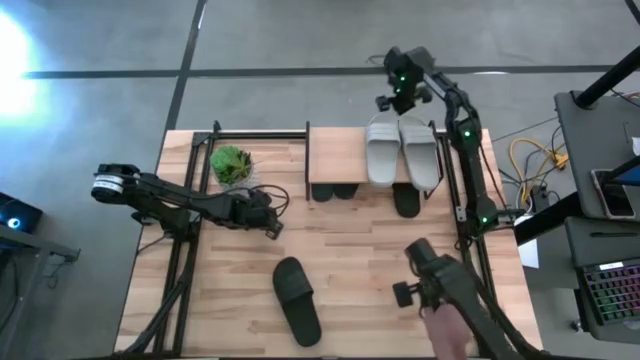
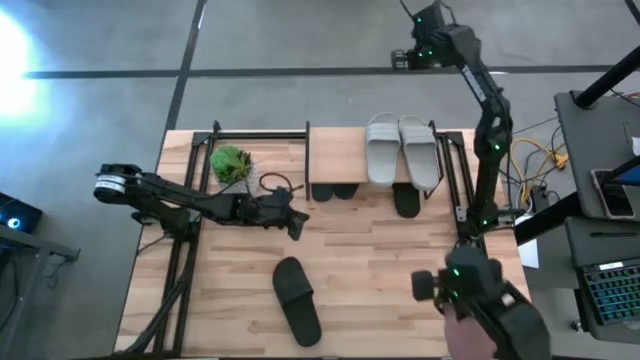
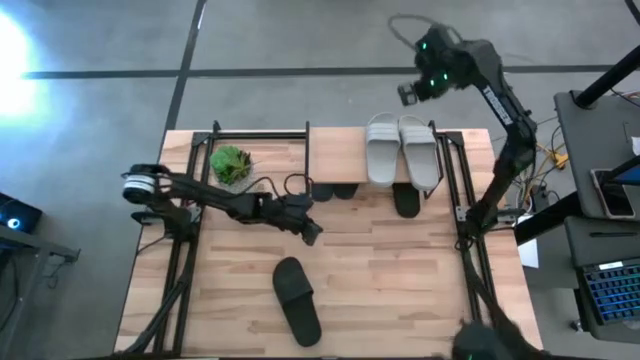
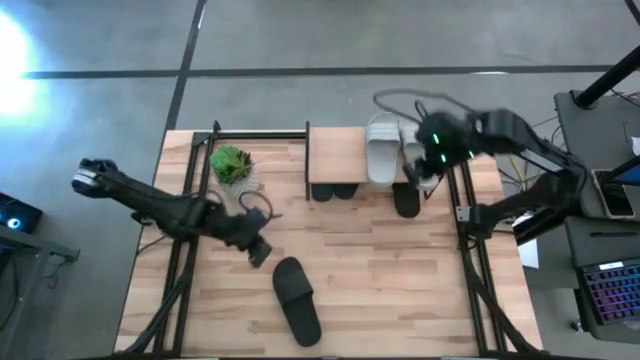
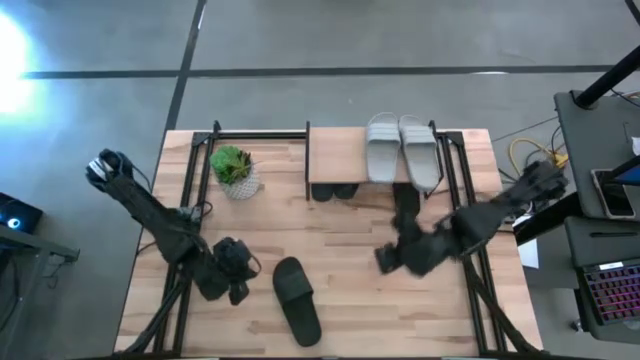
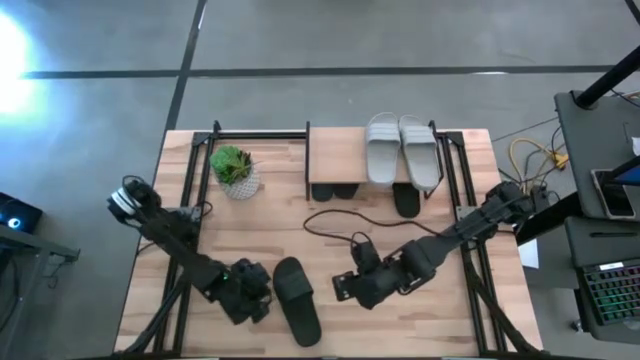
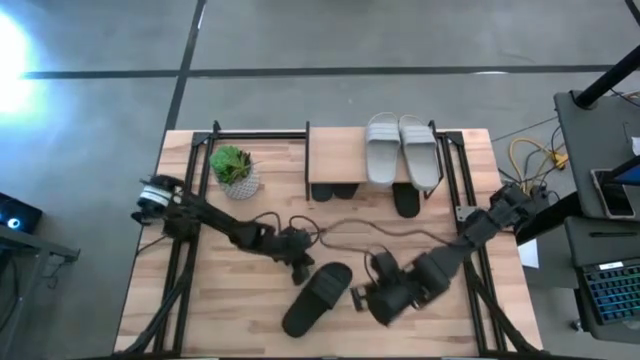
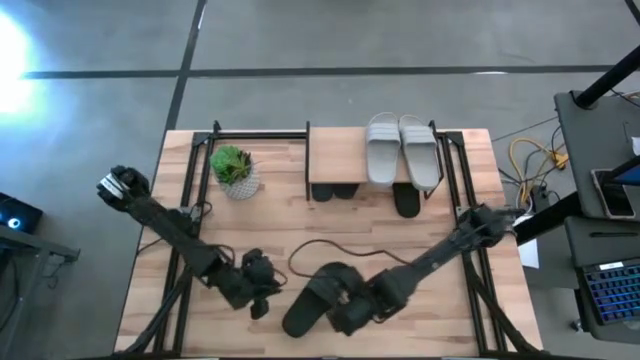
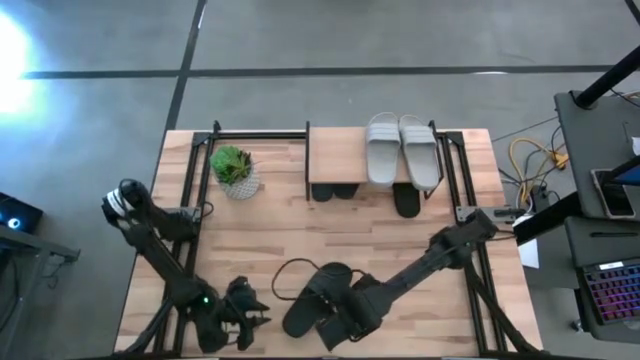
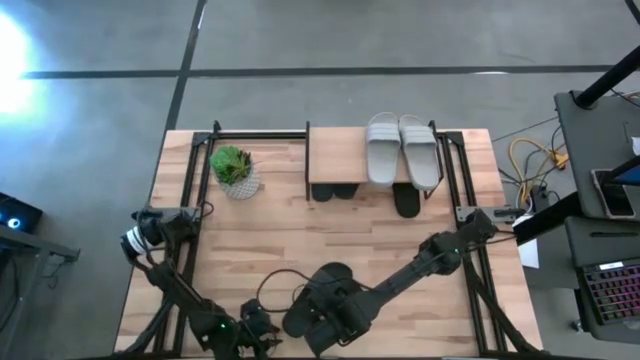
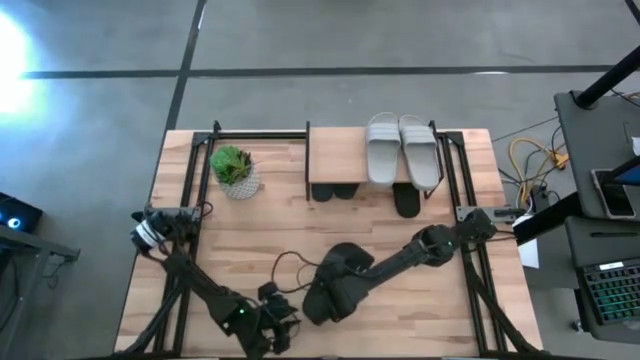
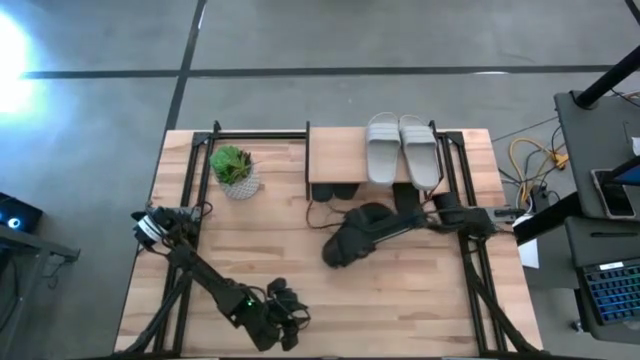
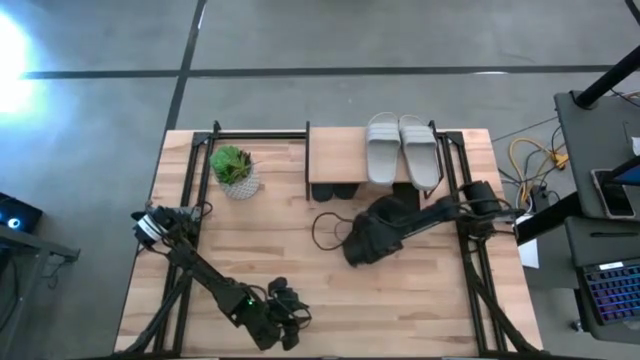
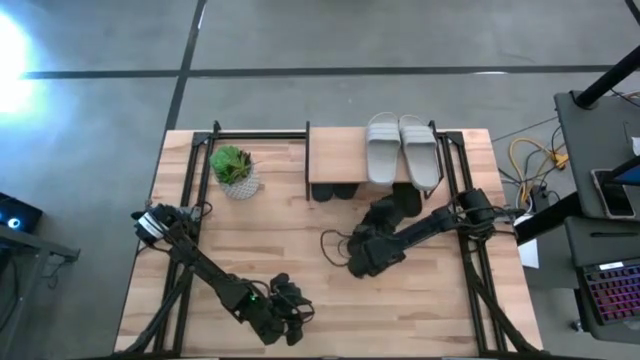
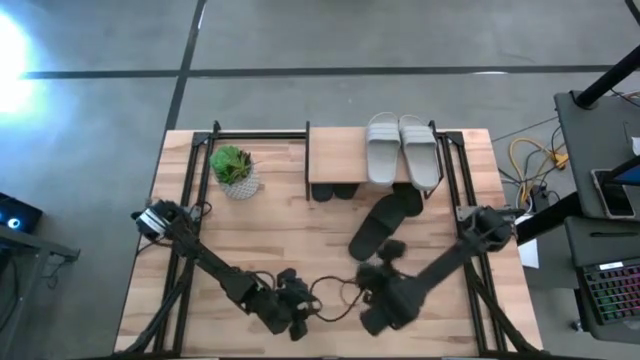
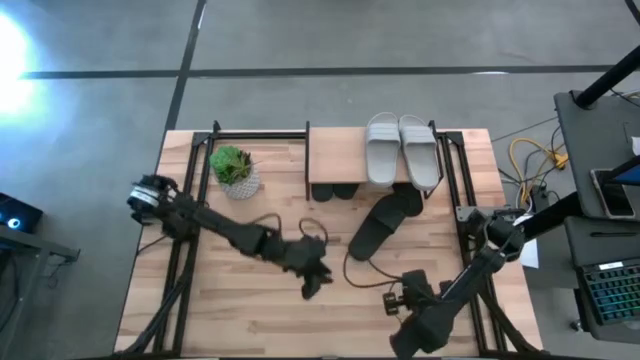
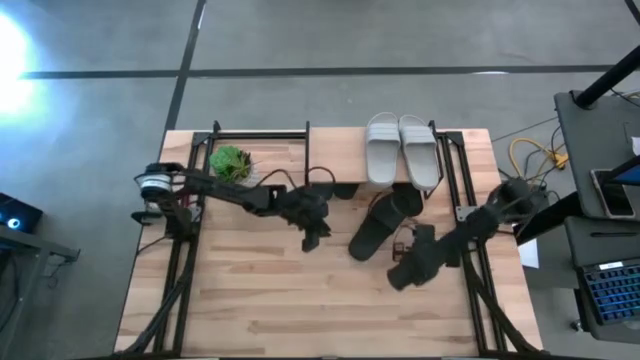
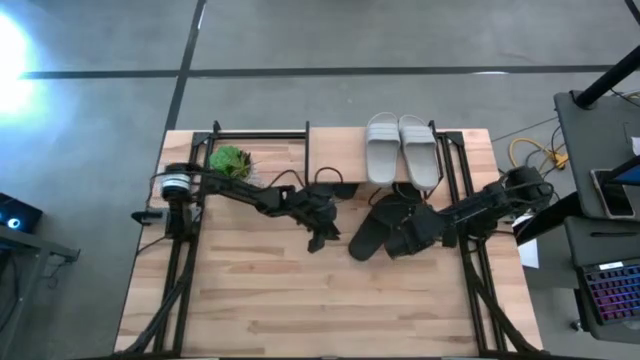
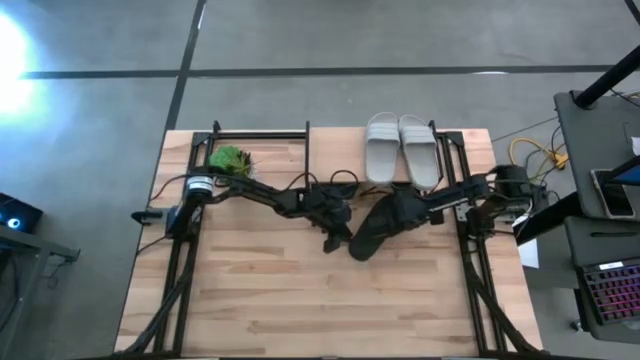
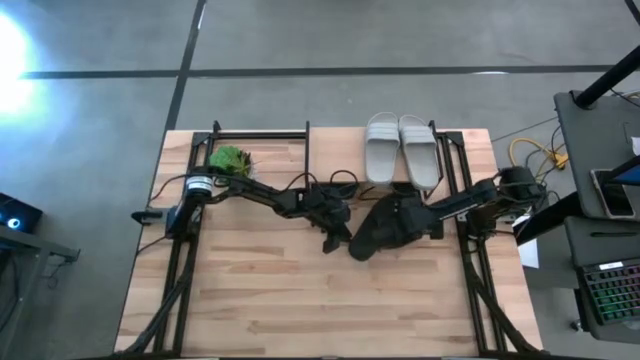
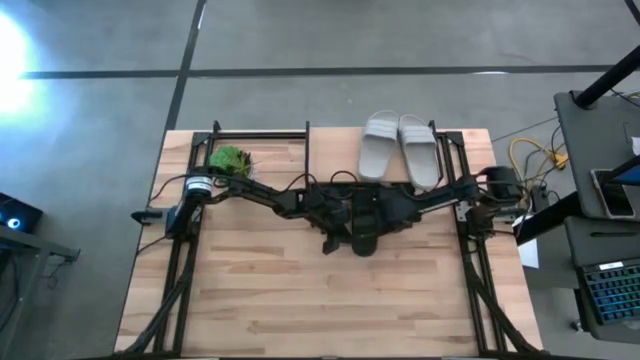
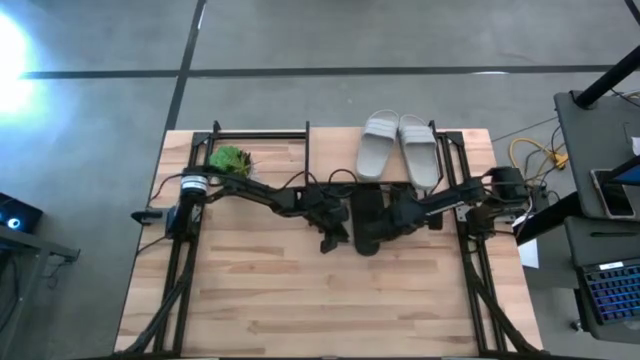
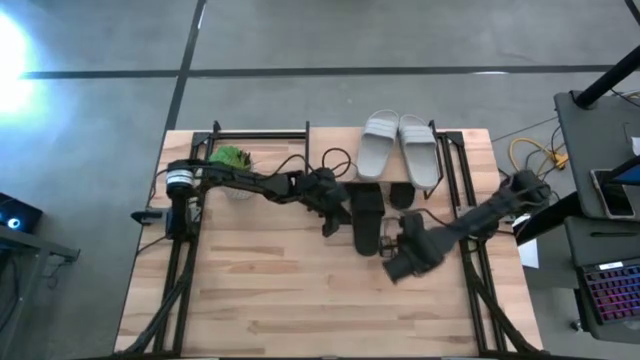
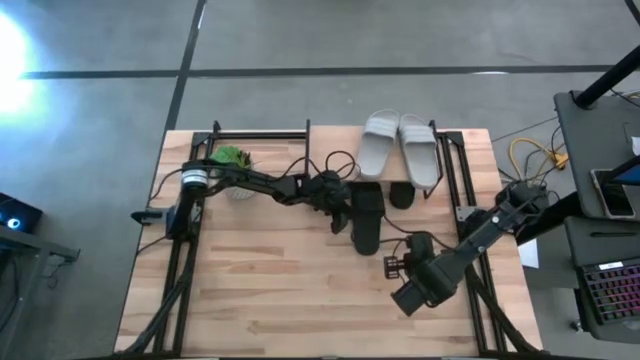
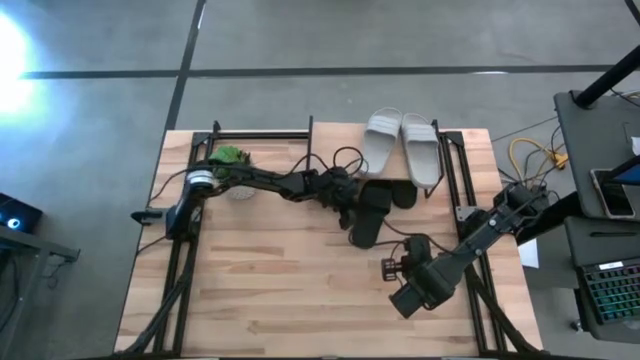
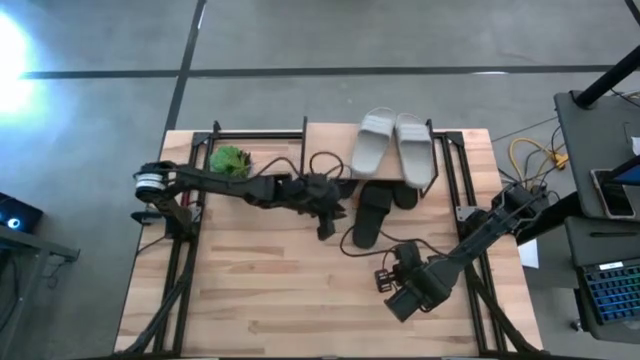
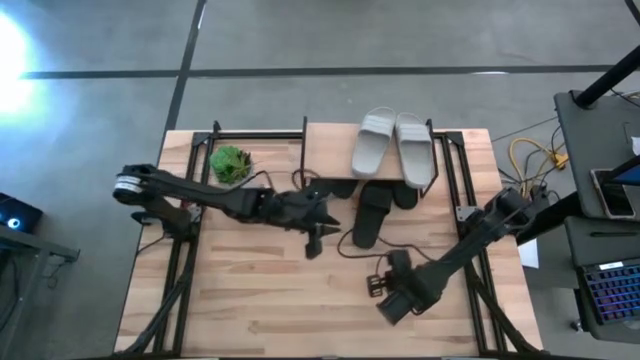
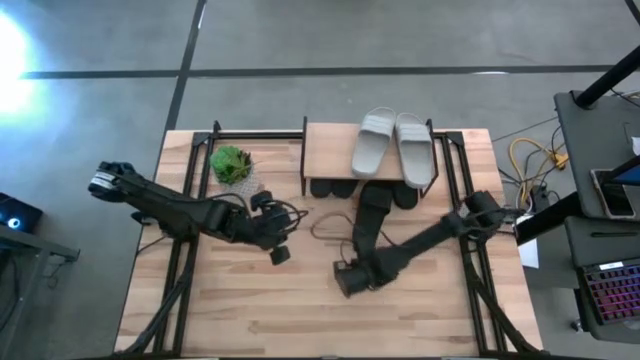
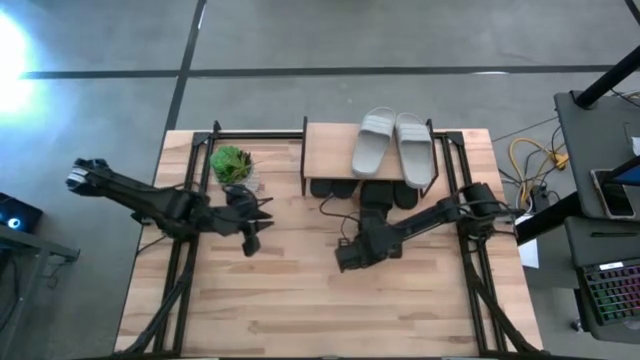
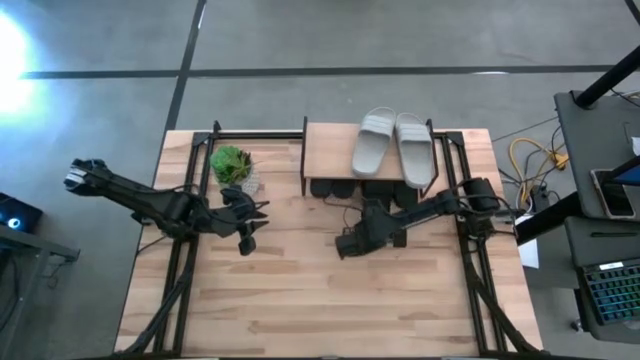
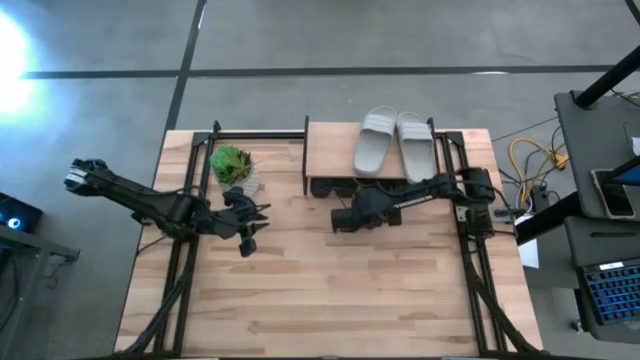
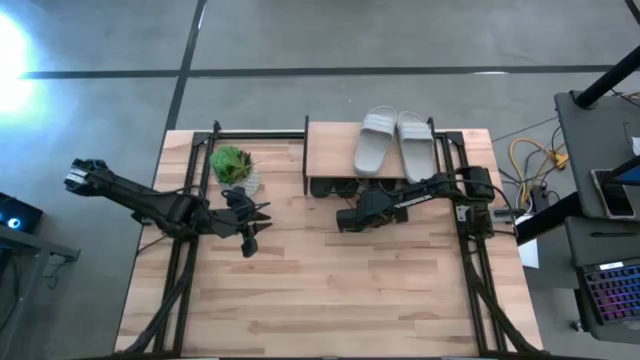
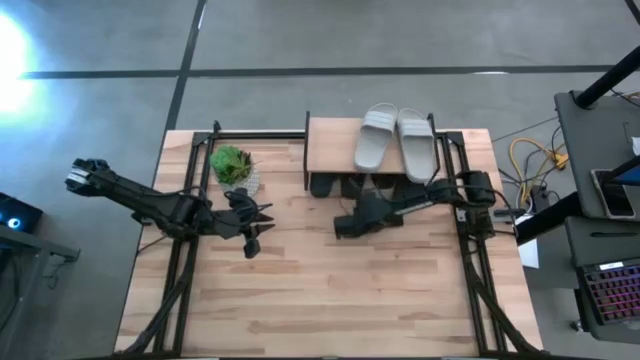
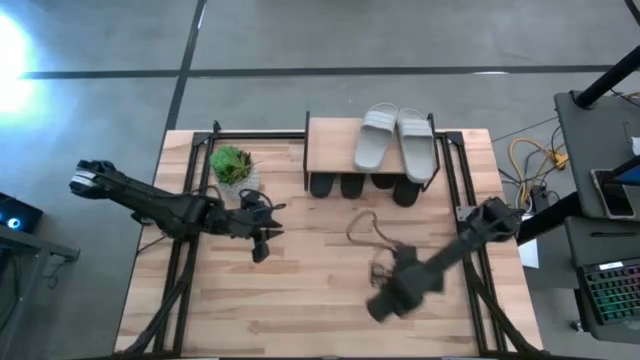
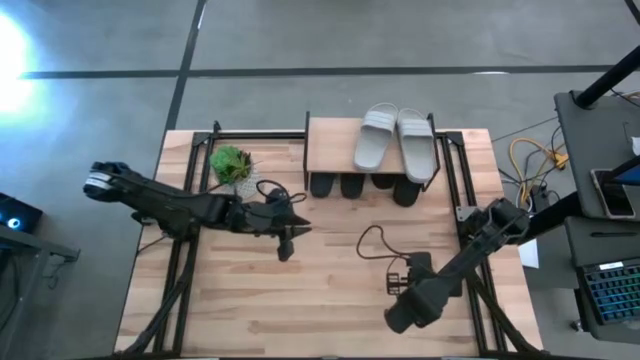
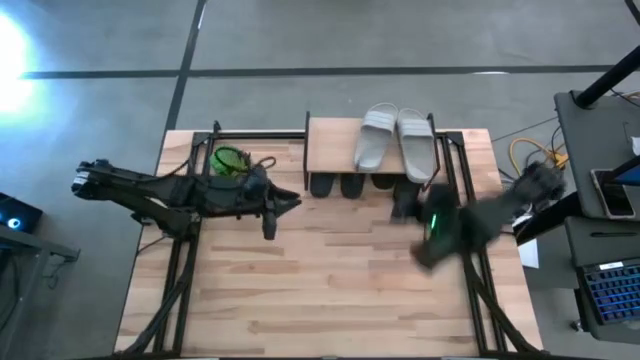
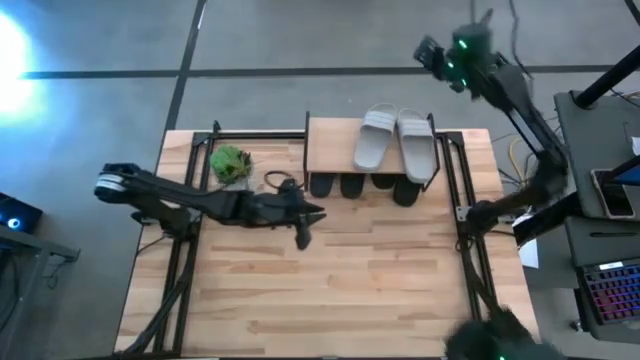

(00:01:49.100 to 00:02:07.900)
Task: Pick and place slides into the shelf
Put the black slipper under the shelf

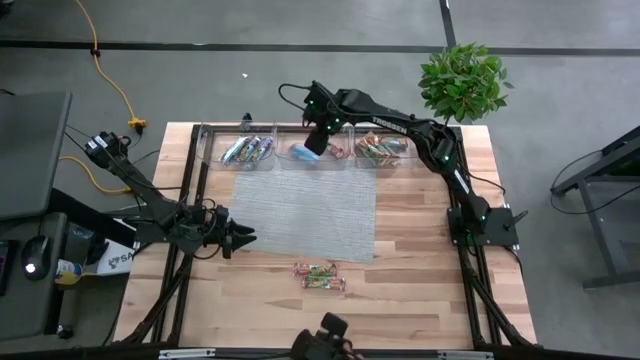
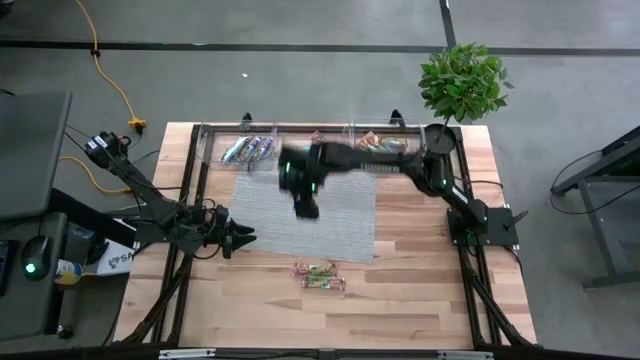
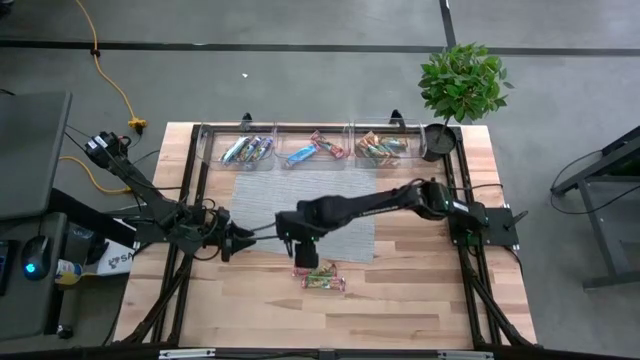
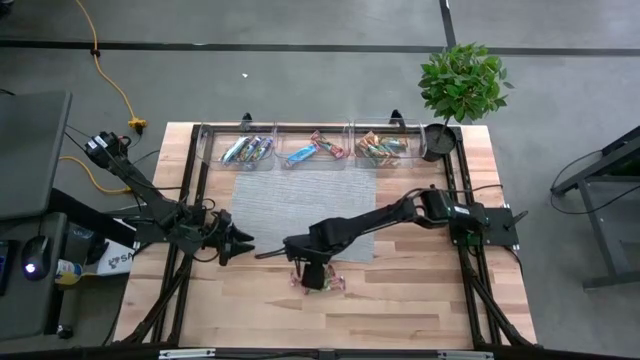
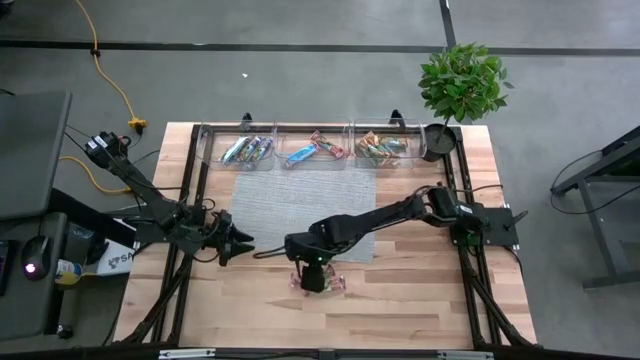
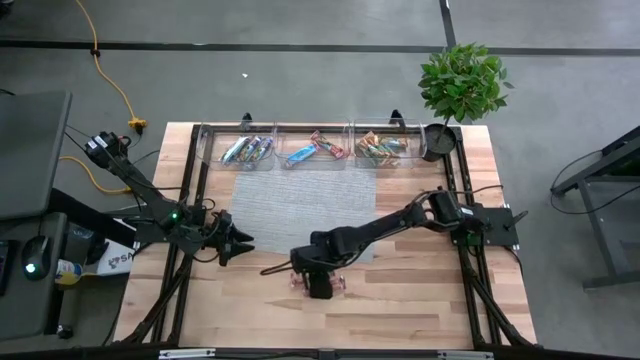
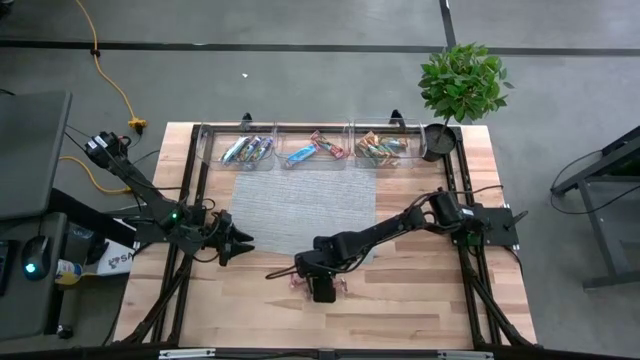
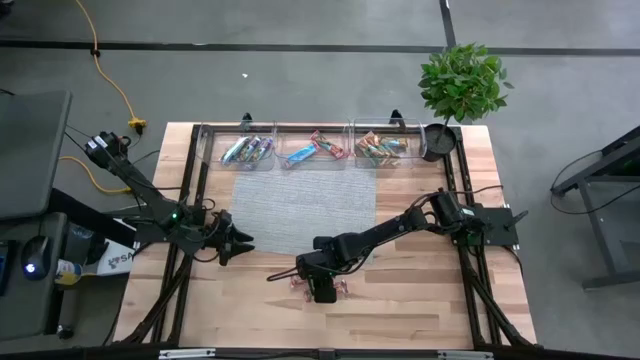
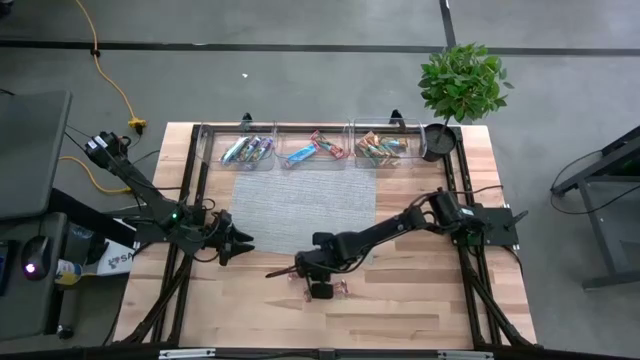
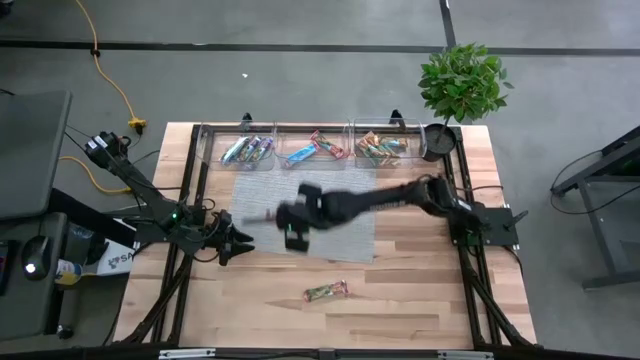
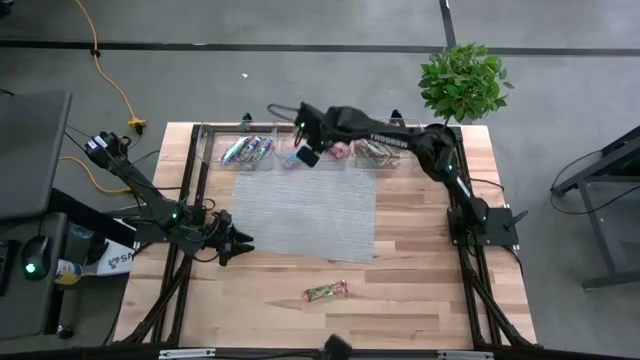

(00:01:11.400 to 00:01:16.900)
Task: Pick and place Granola Bars by type
Put the red granola bar into the middle transparent bin
